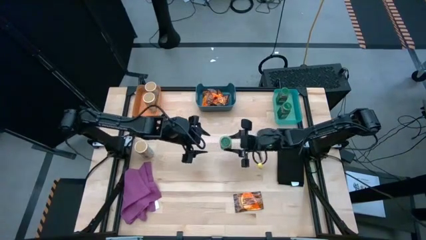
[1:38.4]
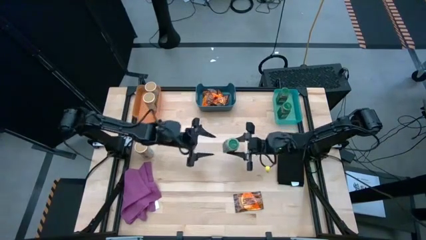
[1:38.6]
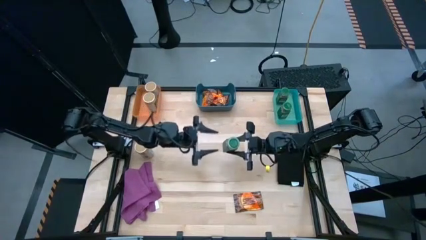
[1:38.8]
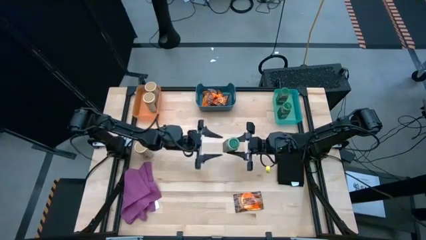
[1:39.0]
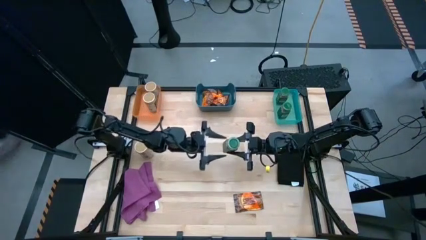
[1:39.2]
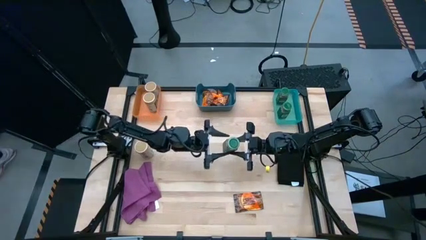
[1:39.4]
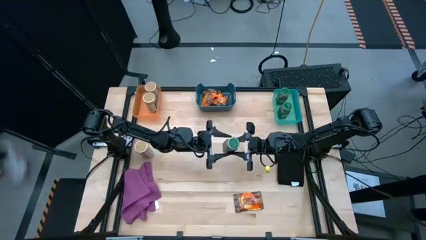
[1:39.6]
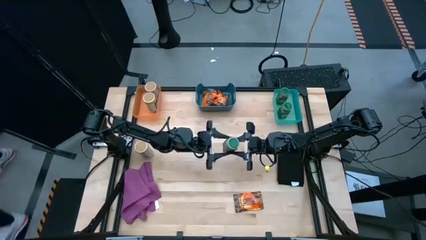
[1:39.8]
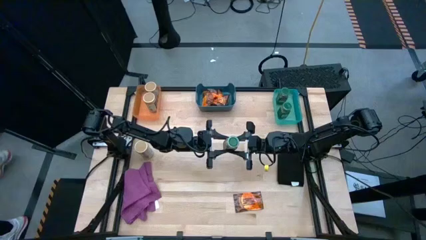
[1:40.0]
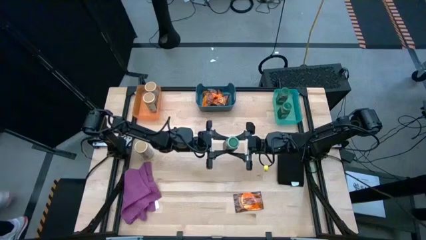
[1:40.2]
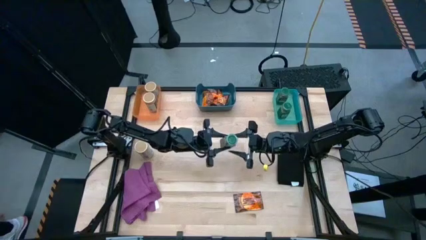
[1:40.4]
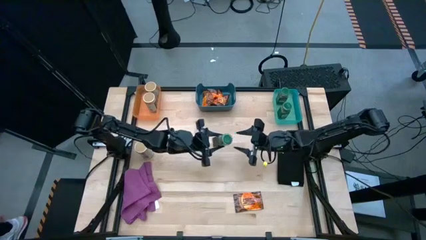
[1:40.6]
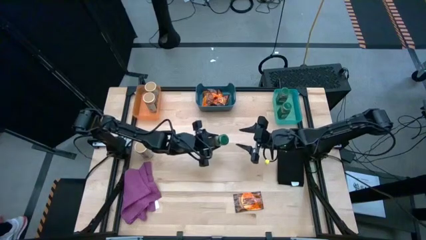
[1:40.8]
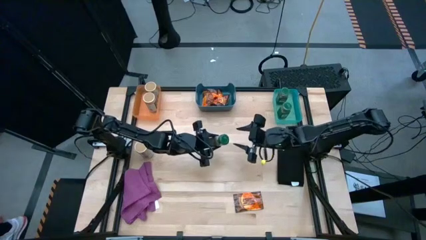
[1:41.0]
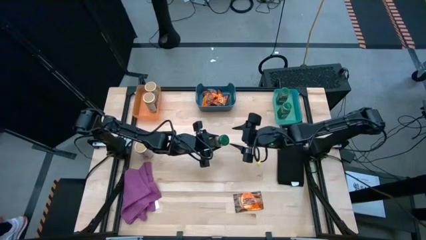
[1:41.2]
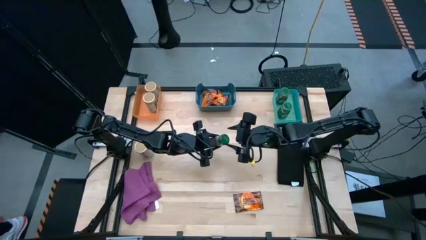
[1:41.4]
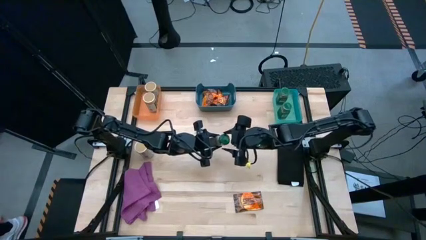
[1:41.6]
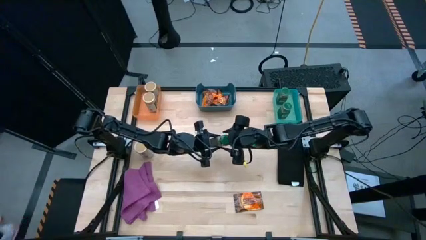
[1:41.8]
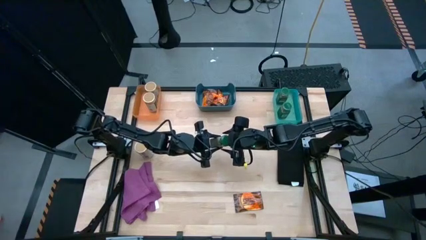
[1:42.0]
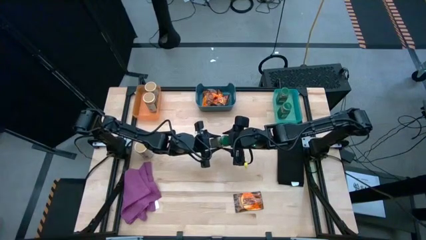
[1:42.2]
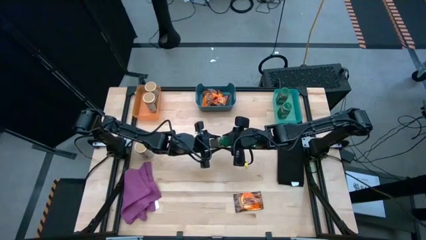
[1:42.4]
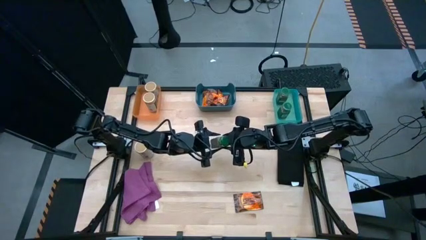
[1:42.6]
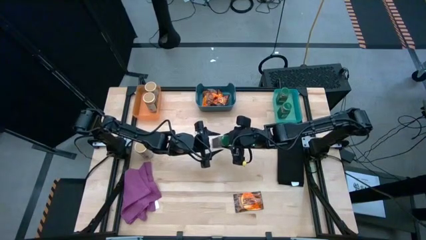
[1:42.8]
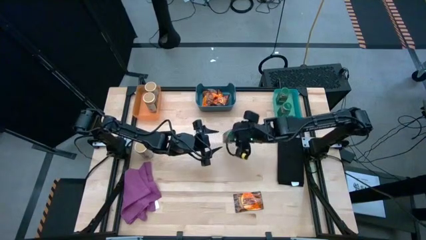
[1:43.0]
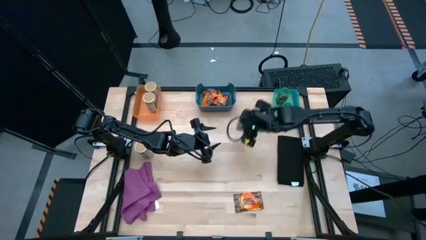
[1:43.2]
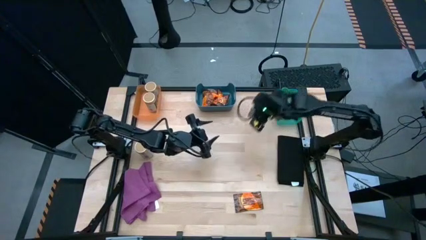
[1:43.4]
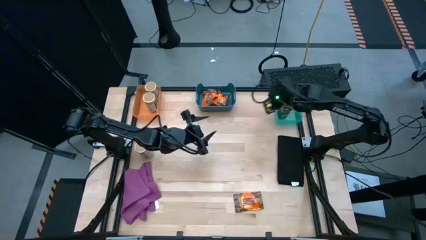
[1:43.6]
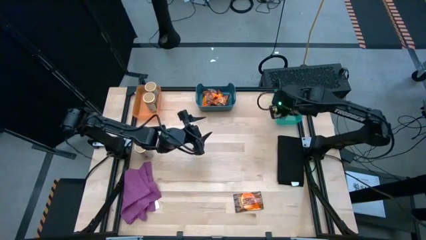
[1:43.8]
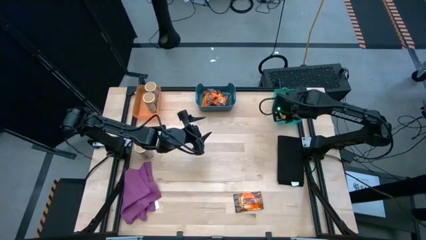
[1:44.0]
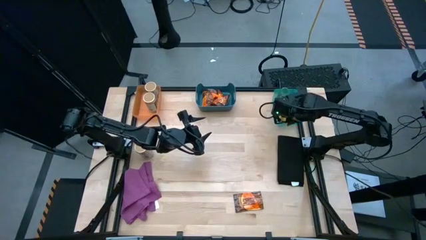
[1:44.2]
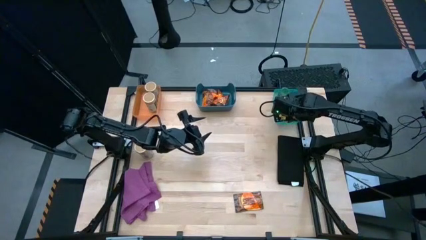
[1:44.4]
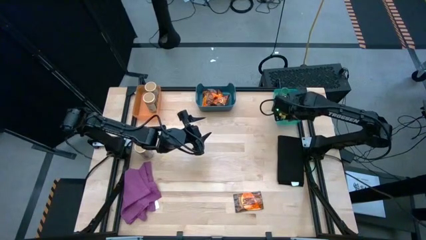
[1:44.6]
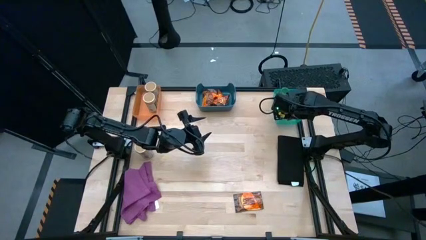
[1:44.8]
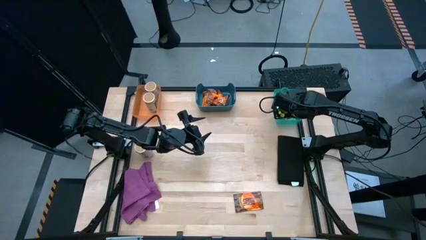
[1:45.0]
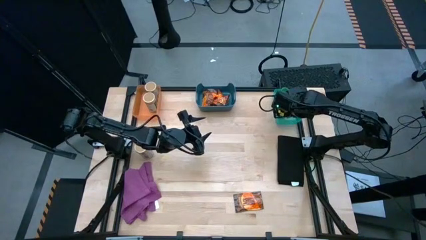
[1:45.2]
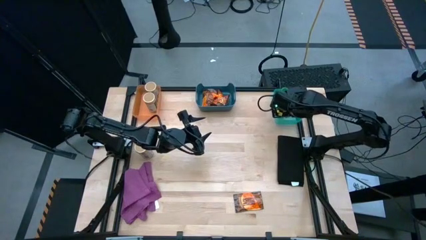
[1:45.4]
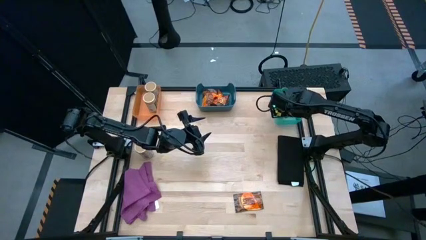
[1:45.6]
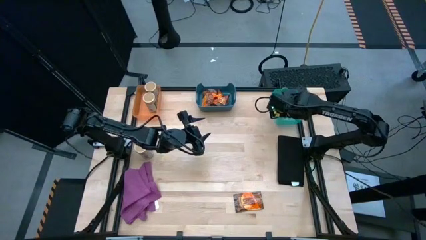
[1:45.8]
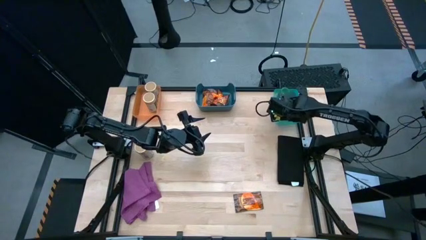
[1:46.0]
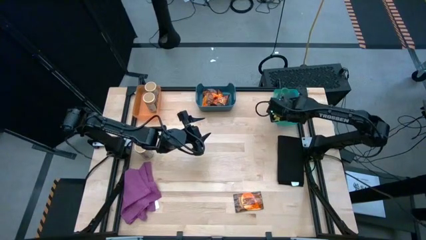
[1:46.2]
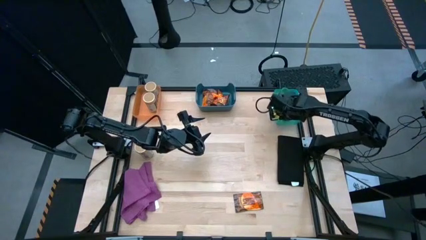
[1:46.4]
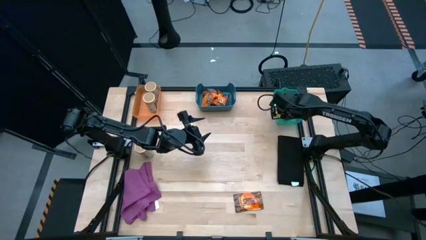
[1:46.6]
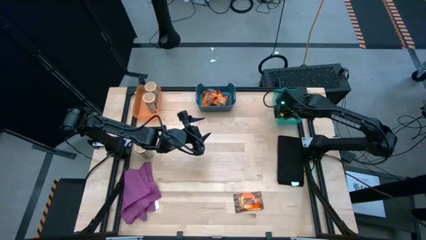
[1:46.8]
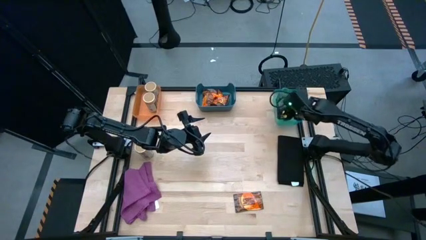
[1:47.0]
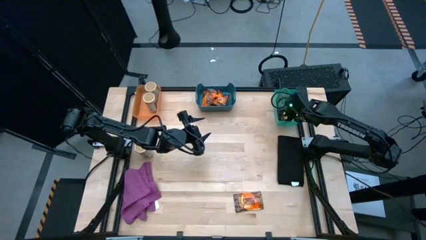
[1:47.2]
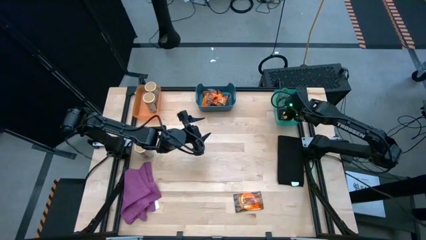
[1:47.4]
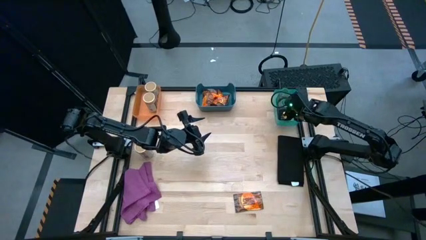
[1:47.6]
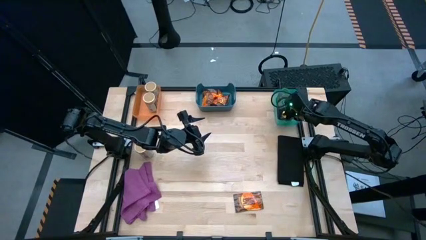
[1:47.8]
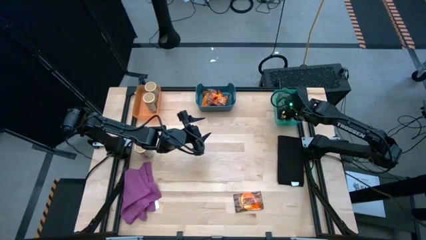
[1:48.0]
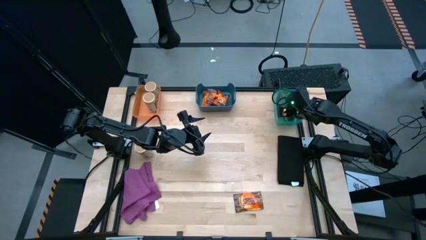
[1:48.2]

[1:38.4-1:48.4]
Task: Sort spices by type
Put the green seasoning bottle into the light blue bin

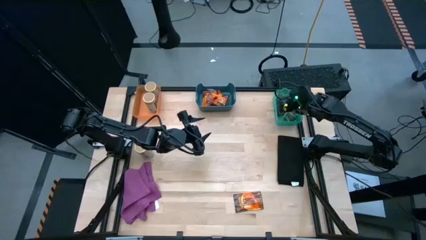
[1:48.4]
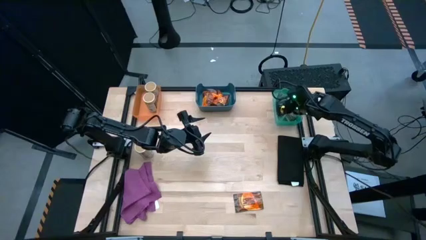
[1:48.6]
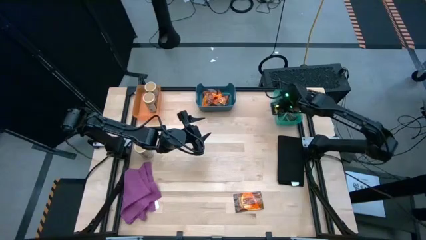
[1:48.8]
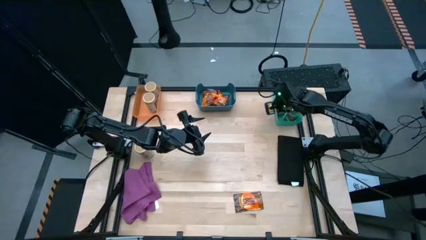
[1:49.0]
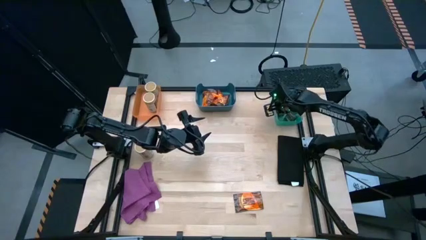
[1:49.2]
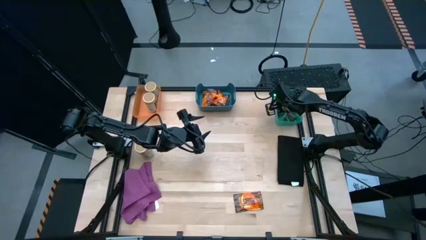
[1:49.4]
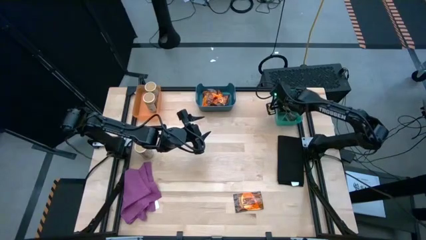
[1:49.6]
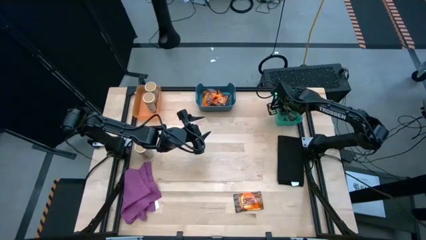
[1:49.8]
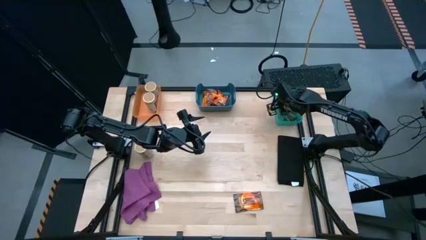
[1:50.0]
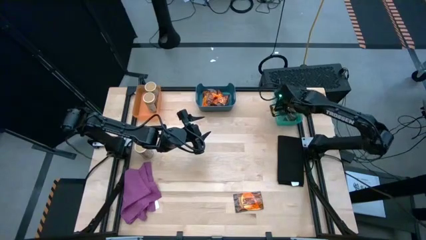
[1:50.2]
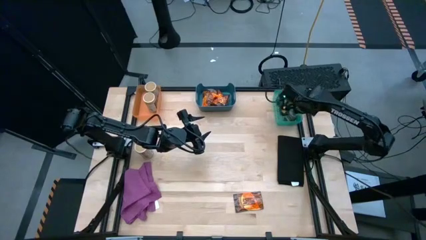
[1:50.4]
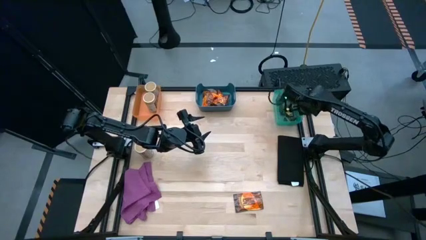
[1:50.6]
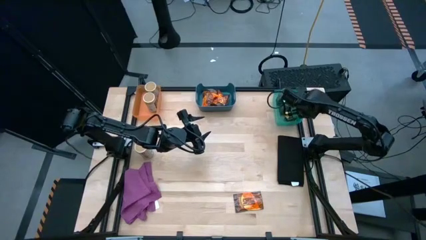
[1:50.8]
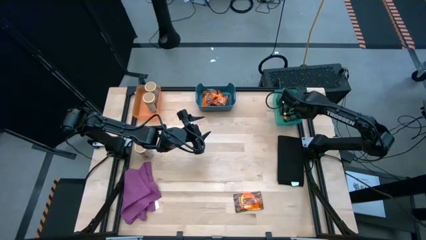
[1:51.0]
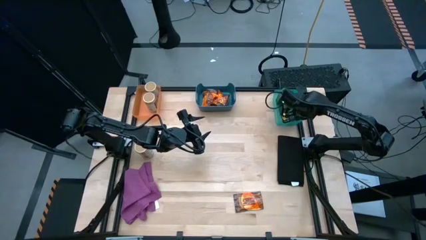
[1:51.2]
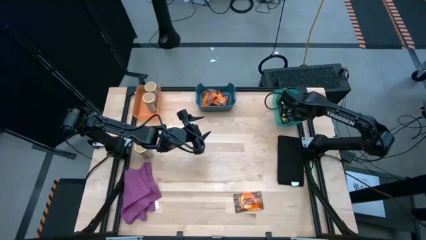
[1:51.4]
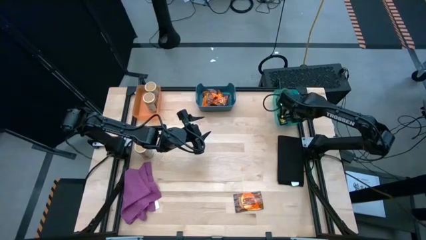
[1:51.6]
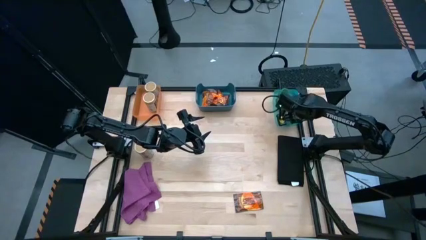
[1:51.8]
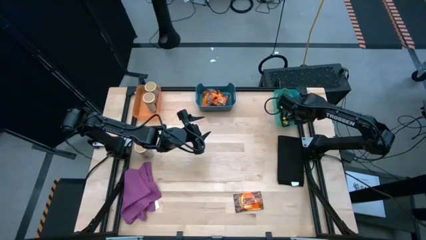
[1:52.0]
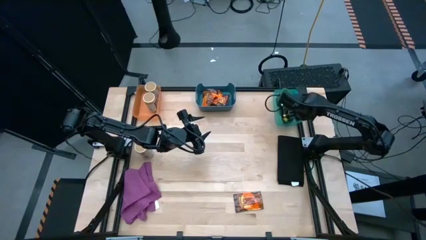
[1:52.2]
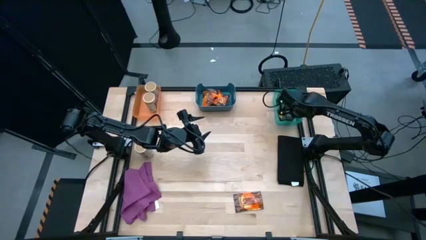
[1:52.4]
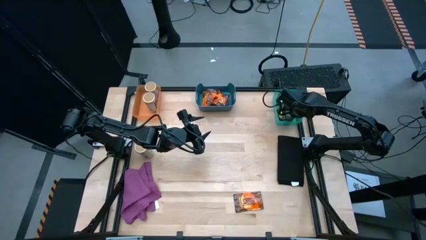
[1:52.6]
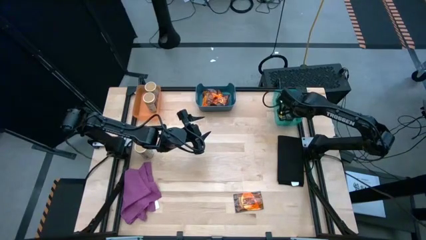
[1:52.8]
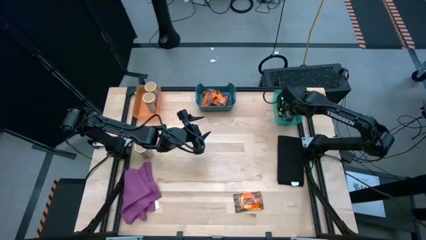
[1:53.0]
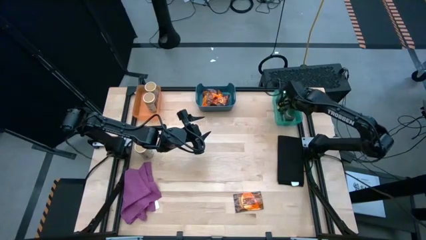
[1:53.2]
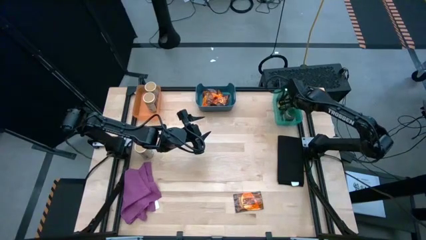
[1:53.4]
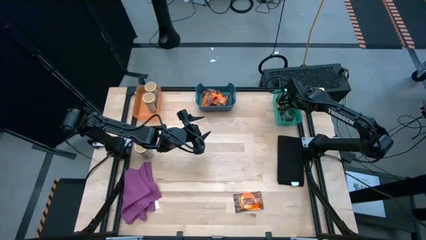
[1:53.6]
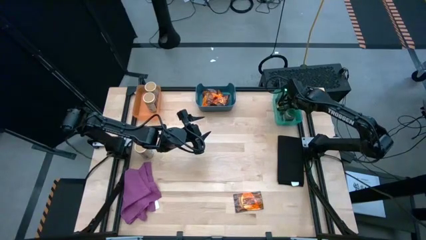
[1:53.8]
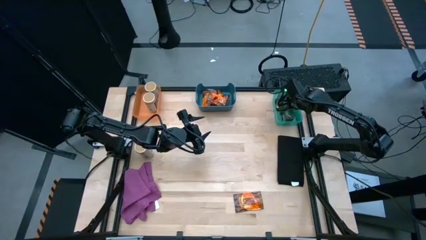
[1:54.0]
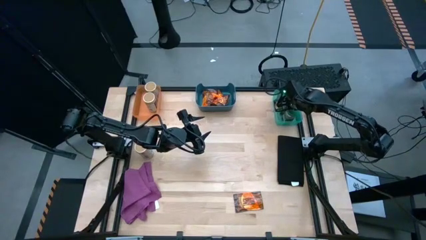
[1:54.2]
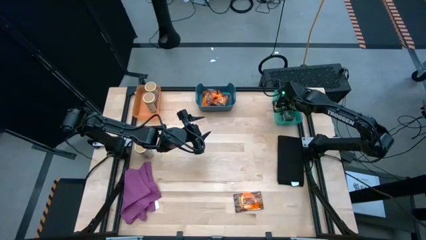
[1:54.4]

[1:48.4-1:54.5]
Adjust the green seasoning bottles
